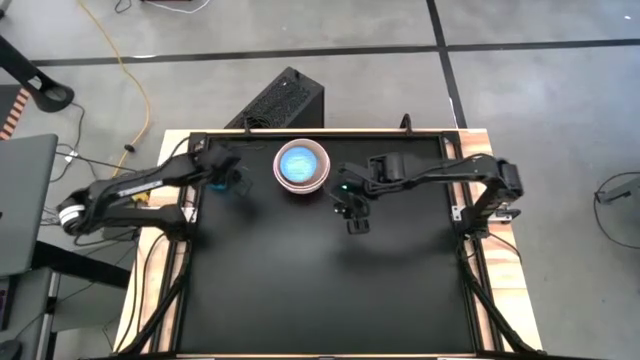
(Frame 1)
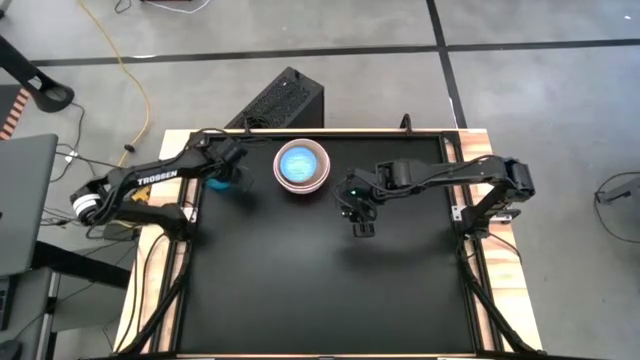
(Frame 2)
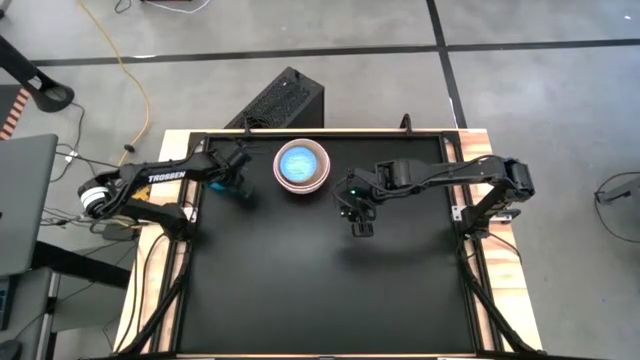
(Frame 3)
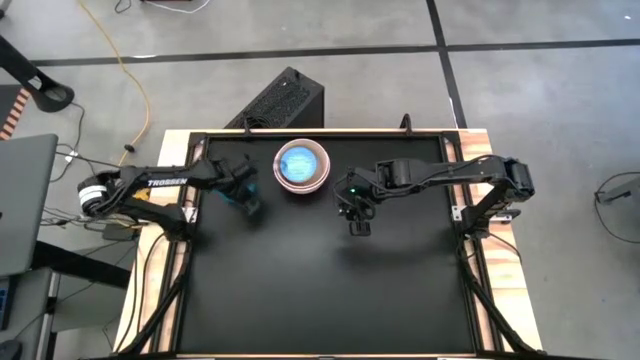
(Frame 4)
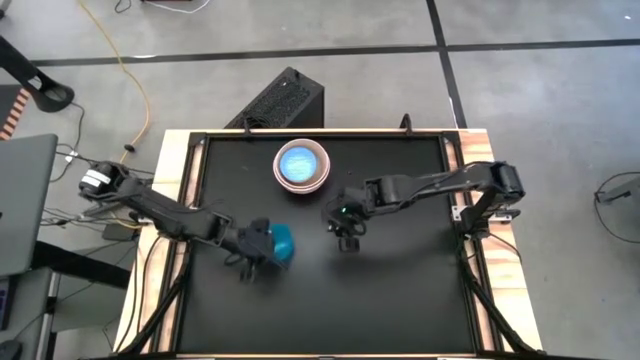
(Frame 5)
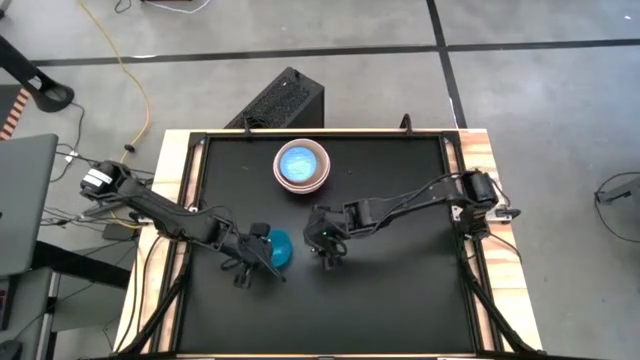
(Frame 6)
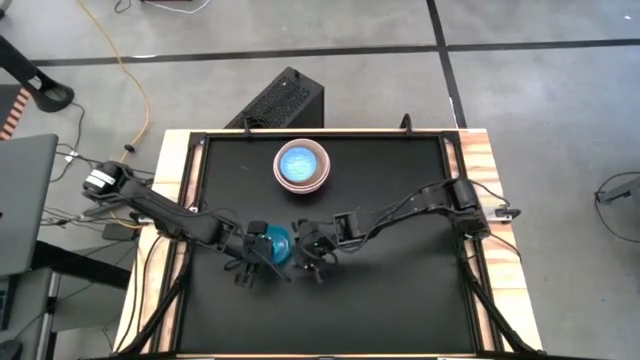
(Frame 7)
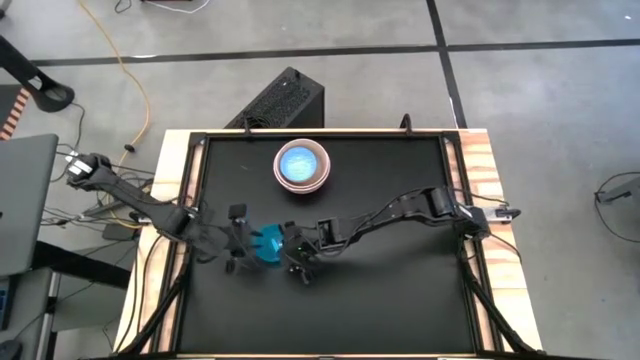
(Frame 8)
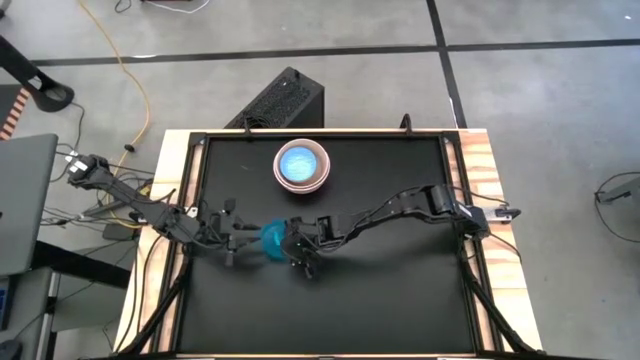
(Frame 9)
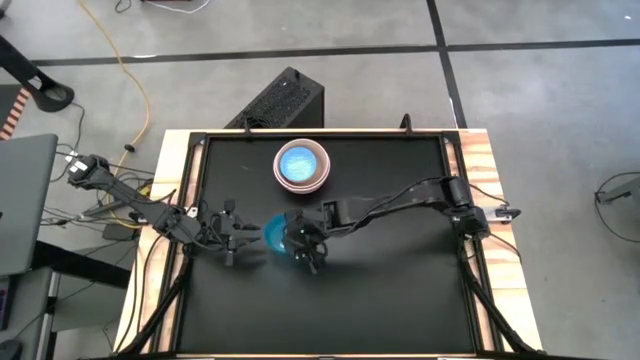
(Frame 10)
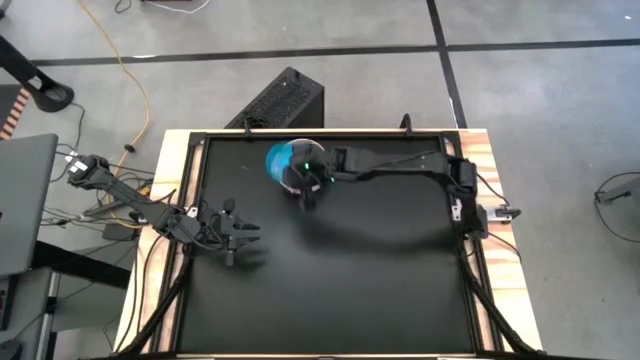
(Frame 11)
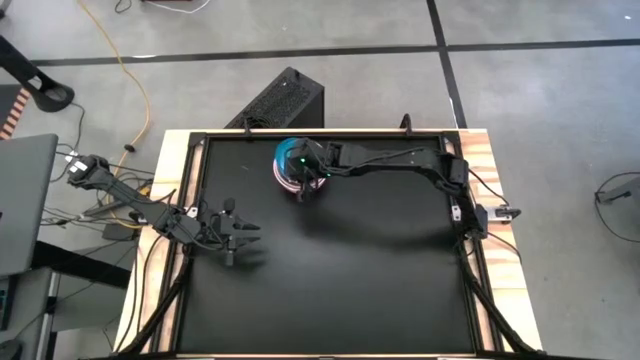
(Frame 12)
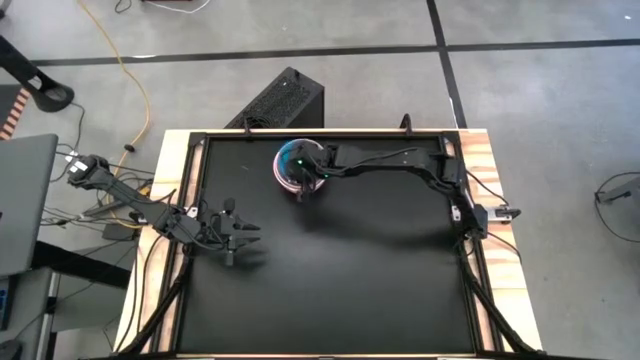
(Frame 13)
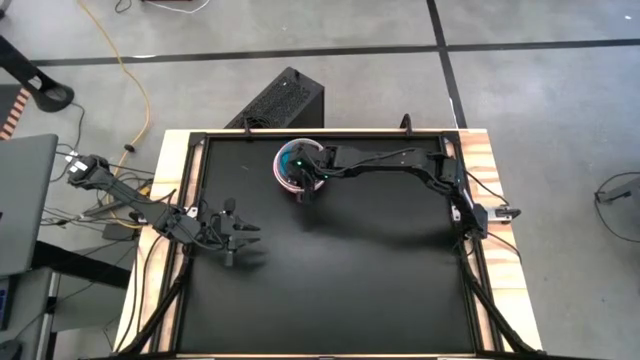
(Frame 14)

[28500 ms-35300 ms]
Stack the blue transparent bowl on top of the blue patterned bowl

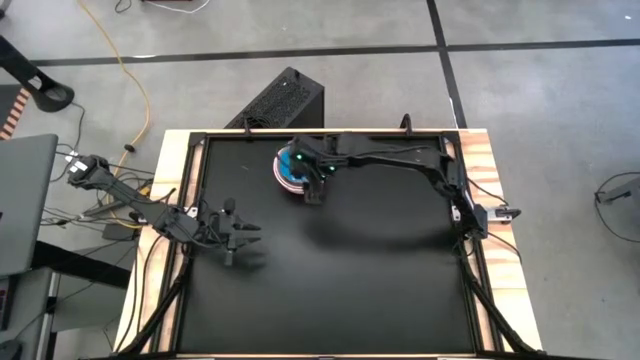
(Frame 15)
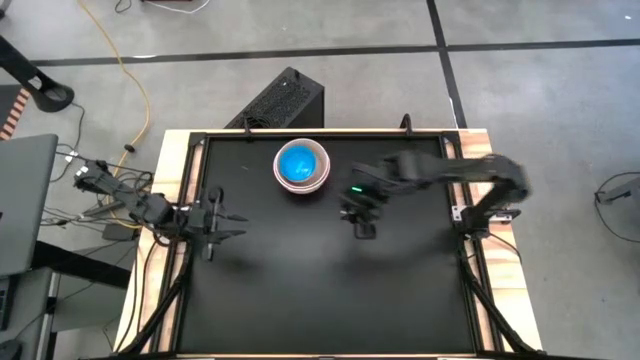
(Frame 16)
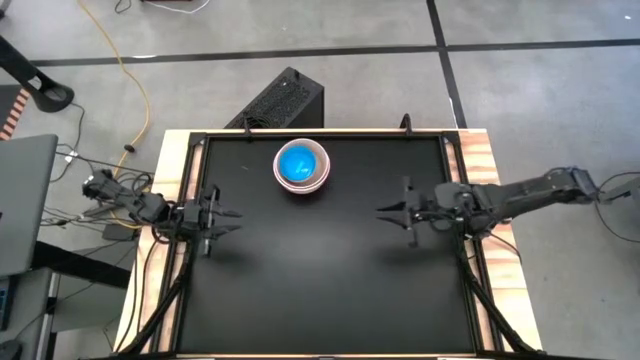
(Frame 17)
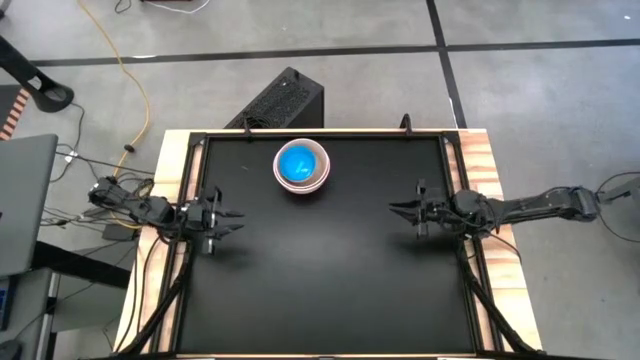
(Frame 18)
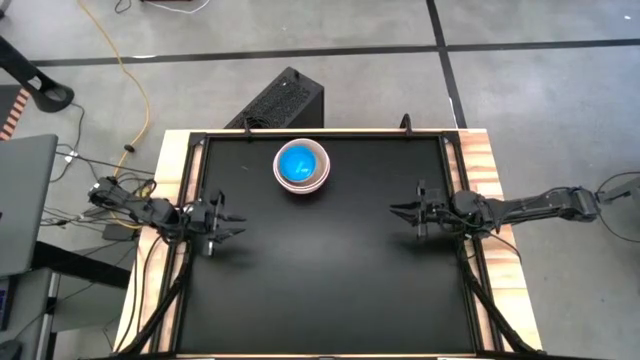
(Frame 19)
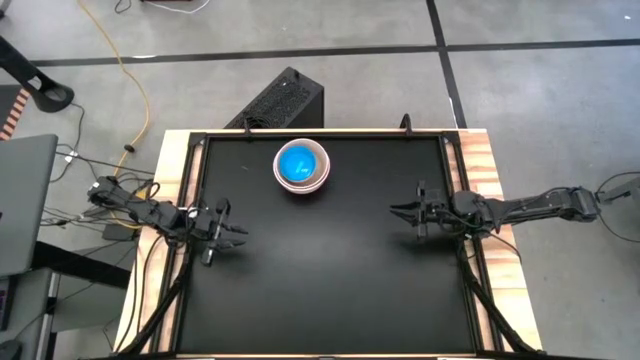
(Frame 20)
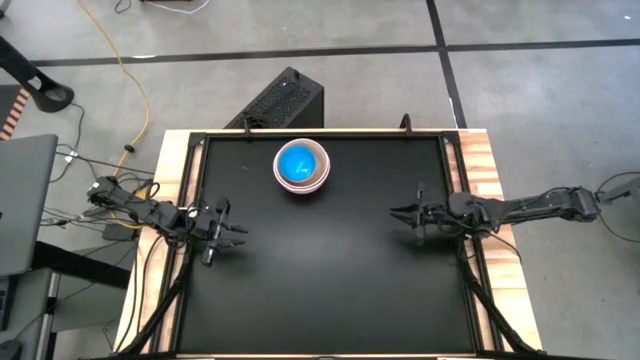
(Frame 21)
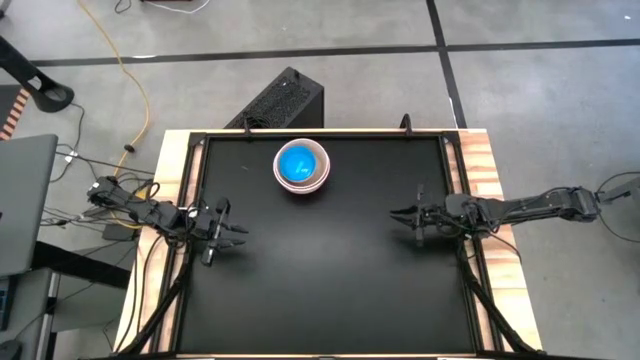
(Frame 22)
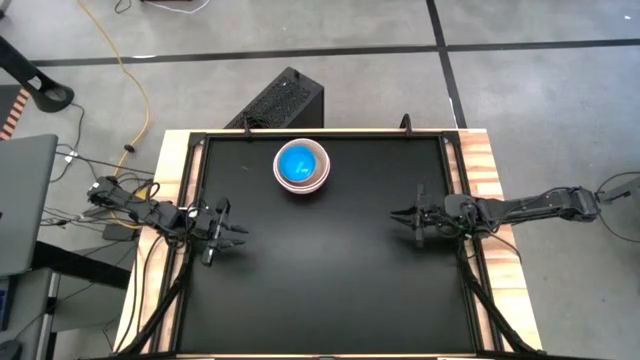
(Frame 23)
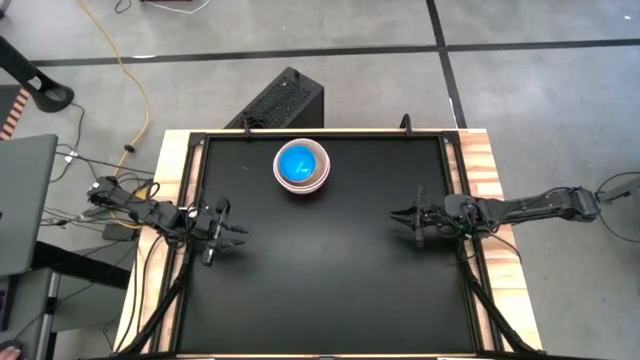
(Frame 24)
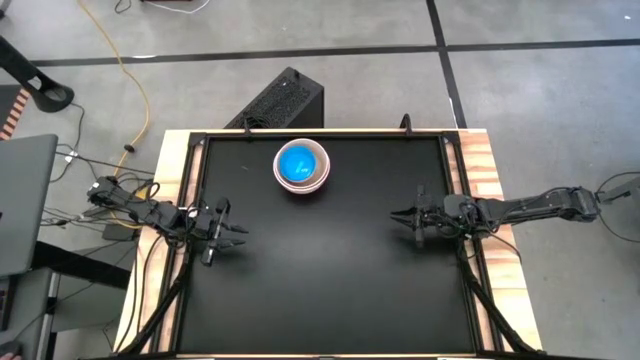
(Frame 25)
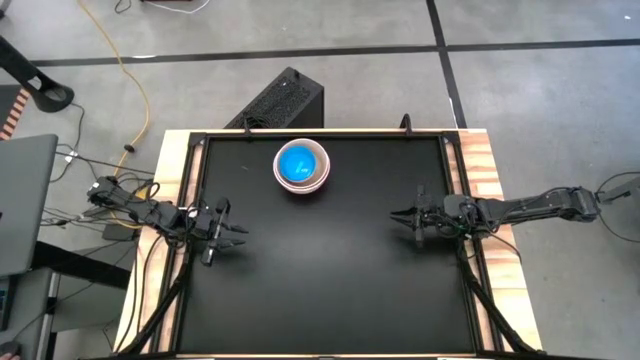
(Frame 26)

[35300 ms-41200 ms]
Return to Home Position
